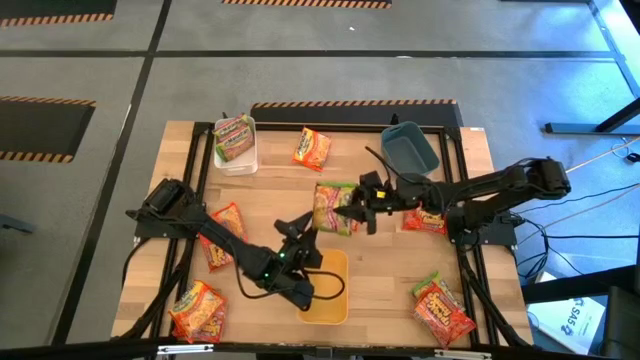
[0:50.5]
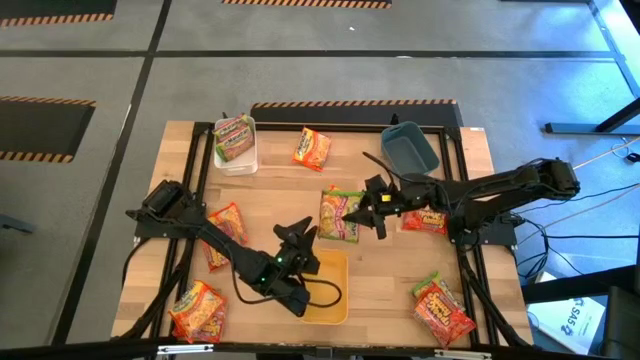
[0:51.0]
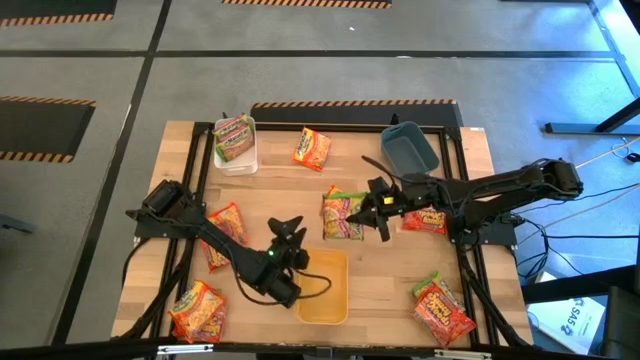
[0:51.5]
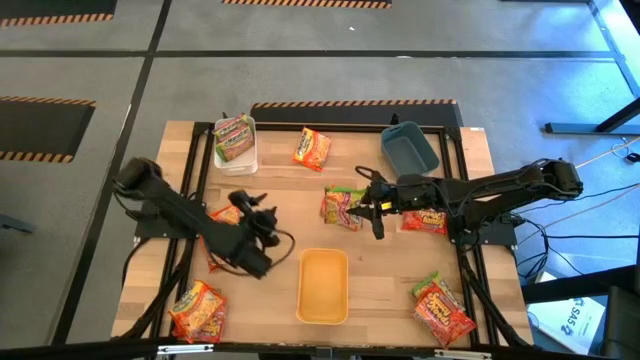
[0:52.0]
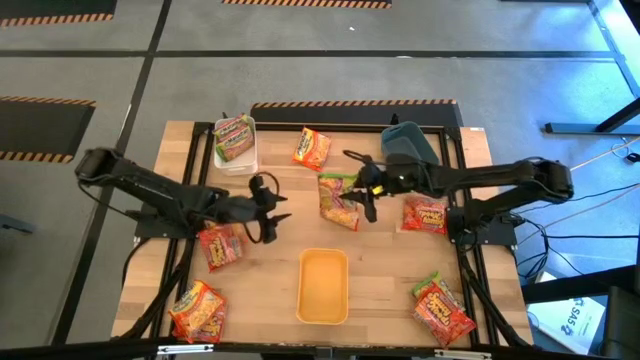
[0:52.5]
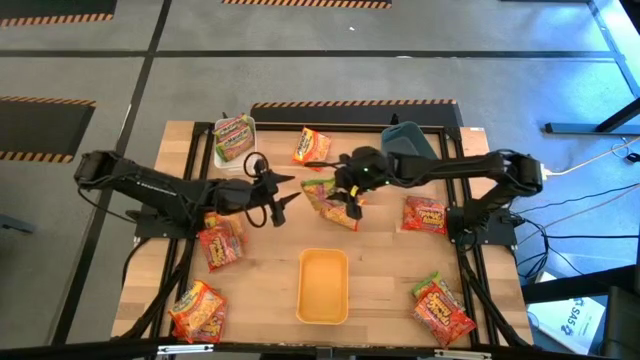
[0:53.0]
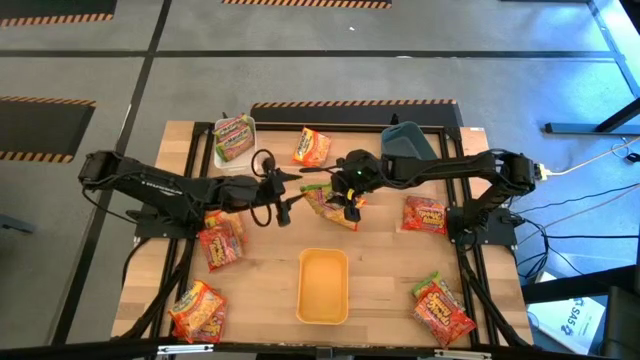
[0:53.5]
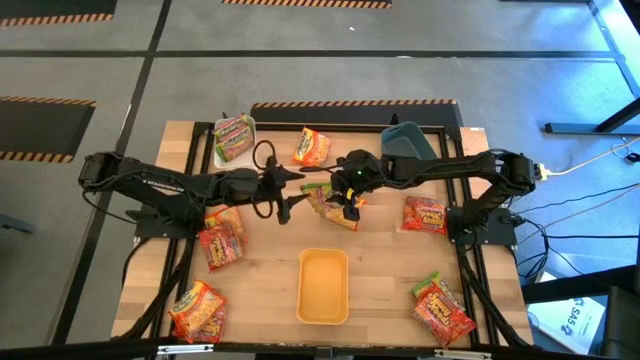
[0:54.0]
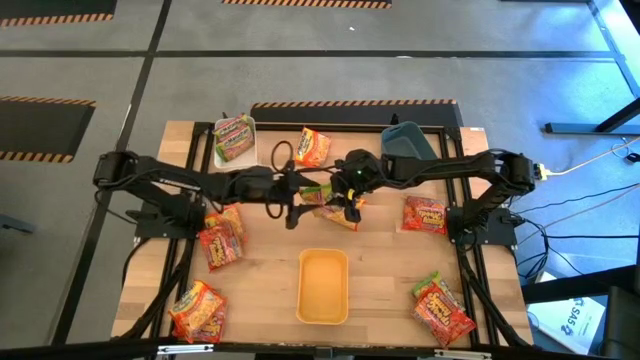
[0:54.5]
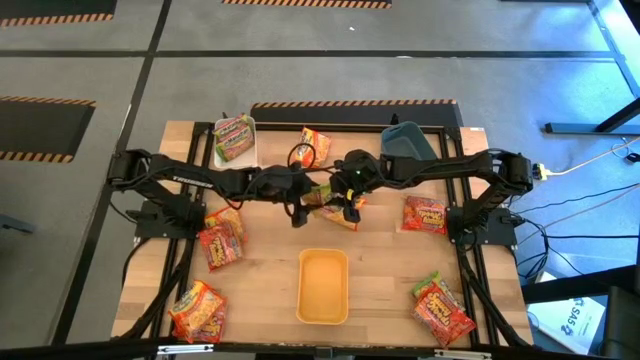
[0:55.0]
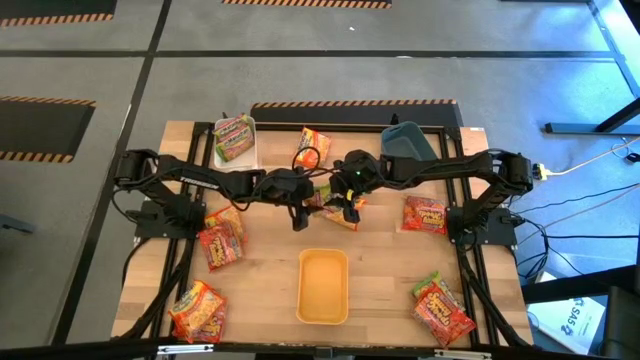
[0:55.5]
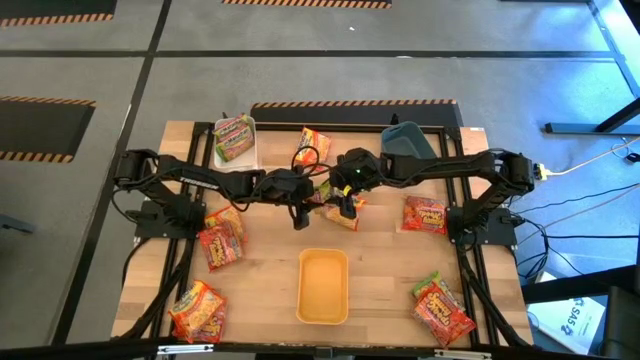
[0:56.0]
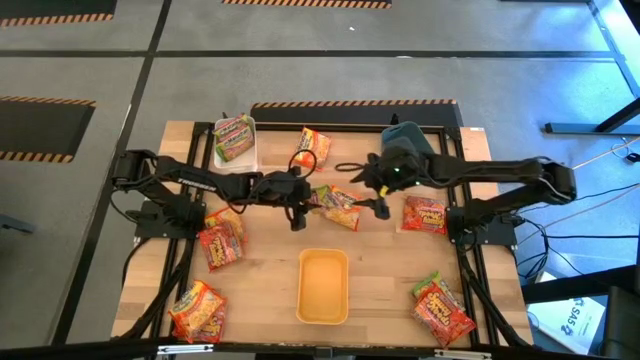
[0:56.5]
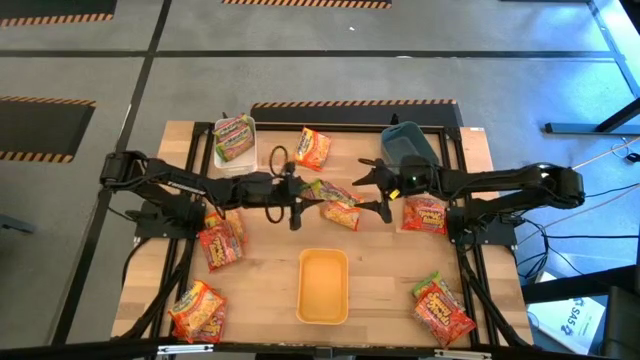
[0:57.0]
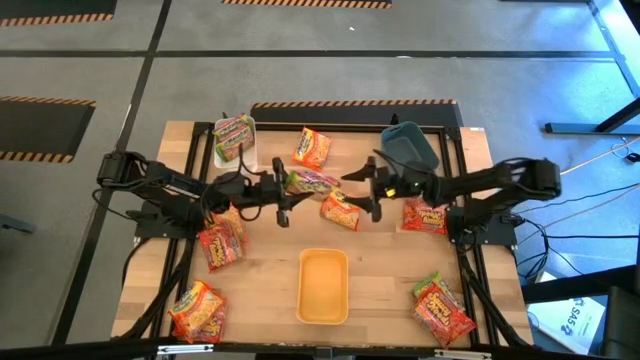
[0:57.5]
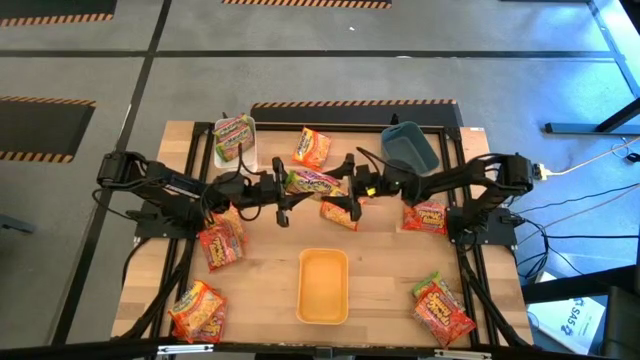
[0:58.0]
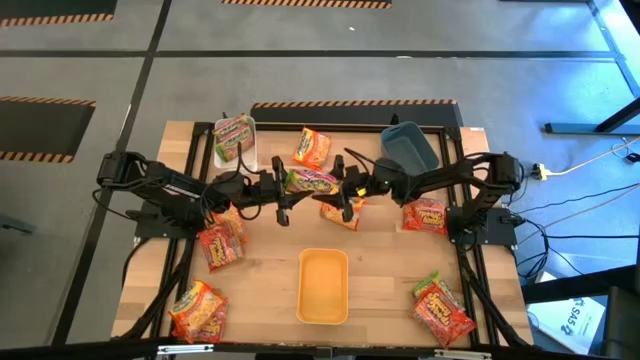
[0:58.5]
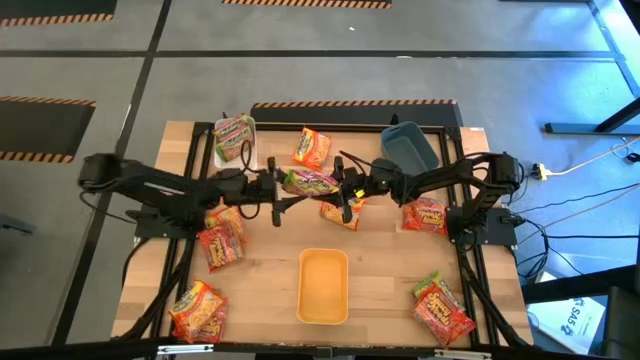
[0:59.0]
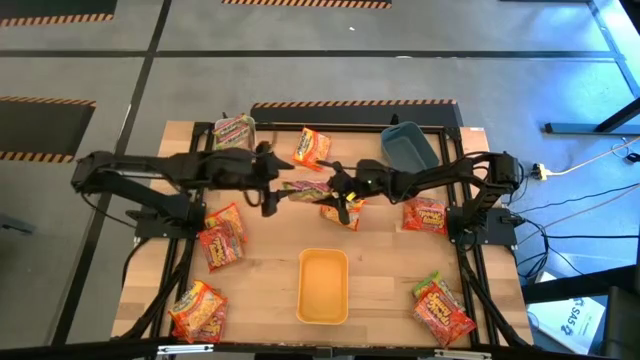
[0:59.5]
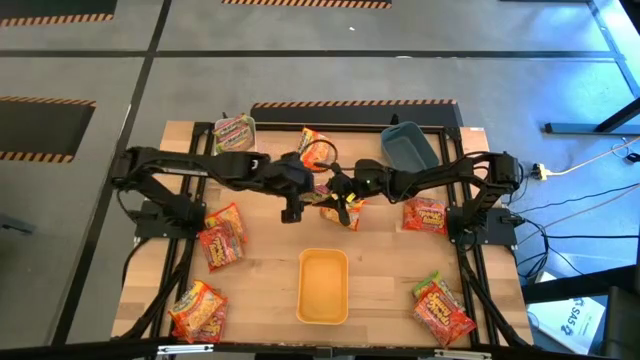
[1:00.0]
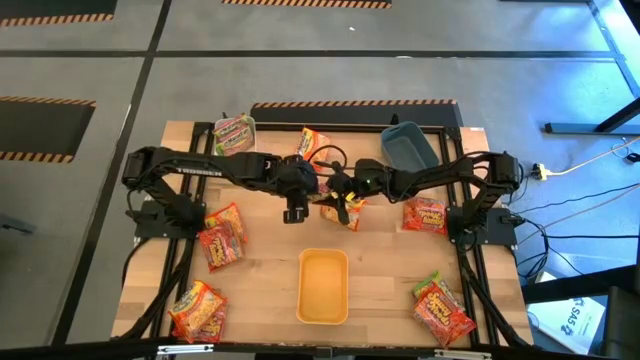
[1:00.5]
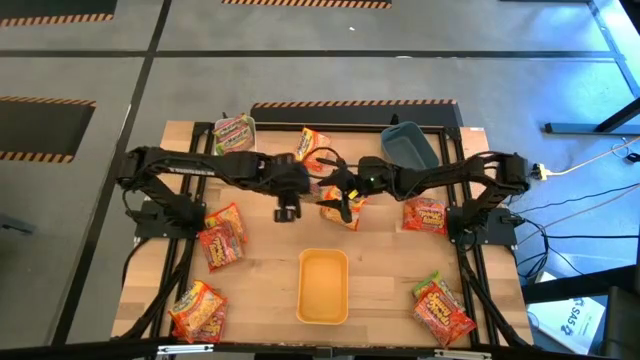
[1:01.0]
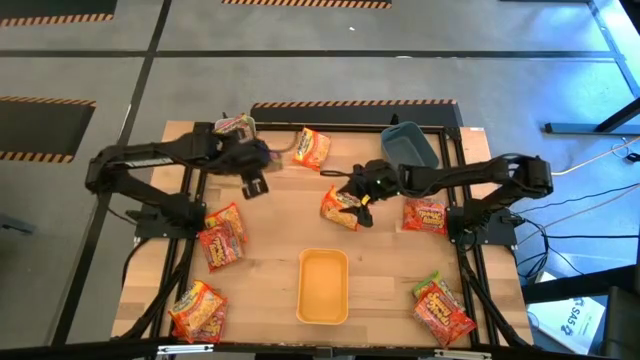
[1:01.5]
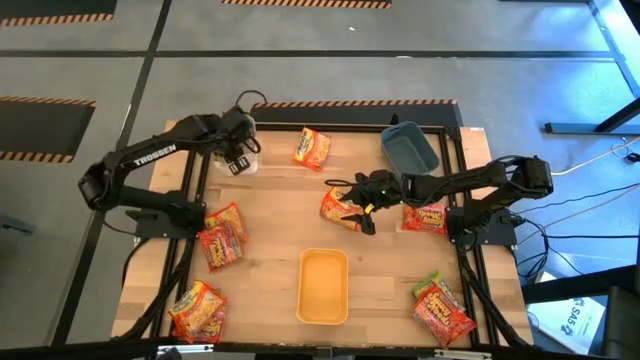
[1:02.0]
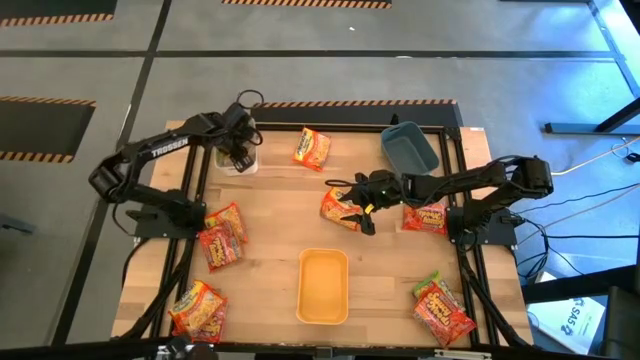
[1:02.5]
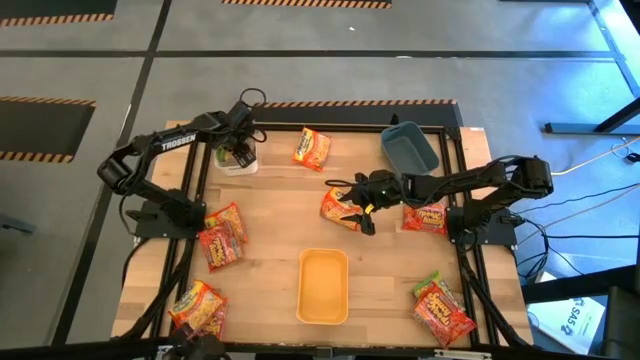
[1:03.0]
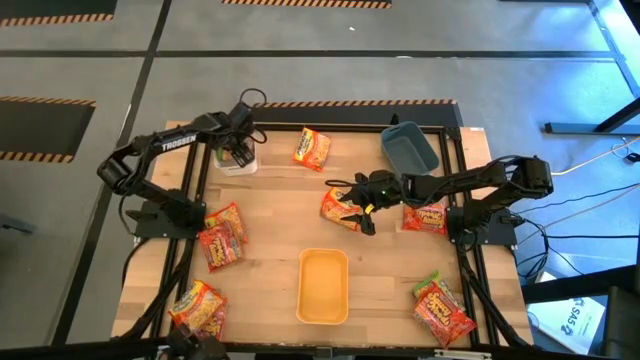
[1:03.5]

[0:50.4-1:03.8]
Task: Sort Maruchan noodles
Put the top green noodle pack into the white bin

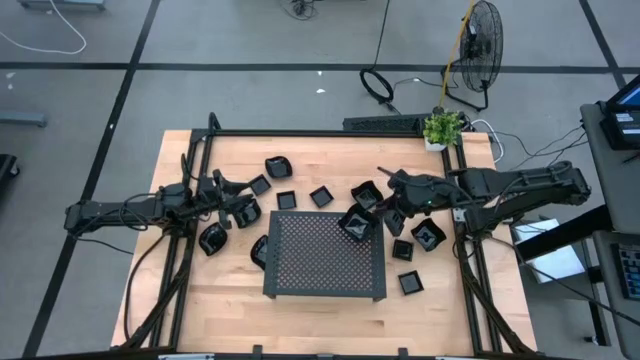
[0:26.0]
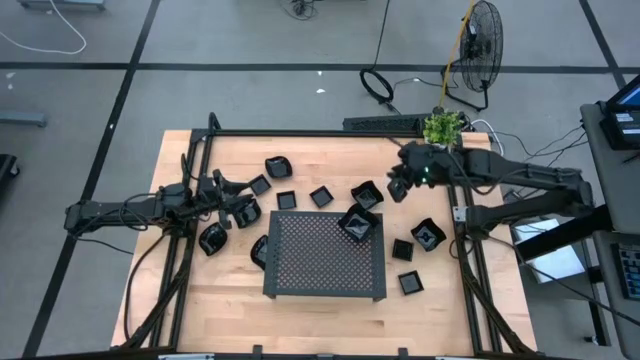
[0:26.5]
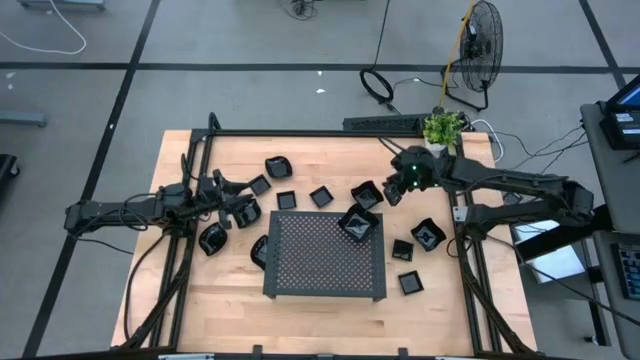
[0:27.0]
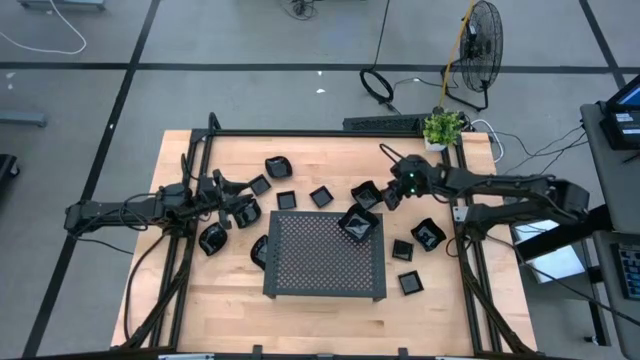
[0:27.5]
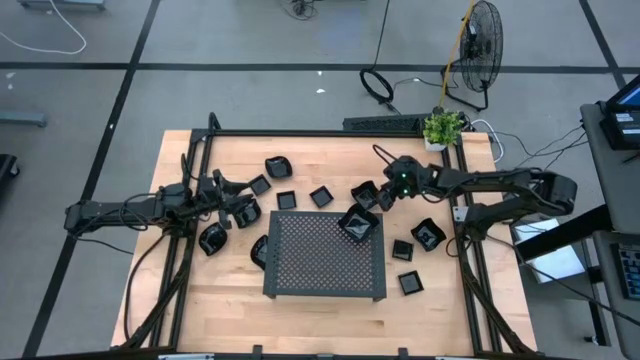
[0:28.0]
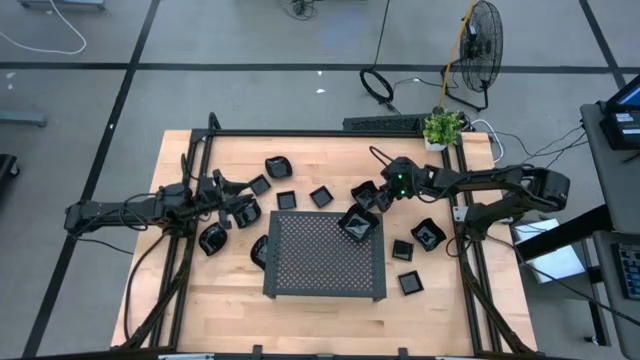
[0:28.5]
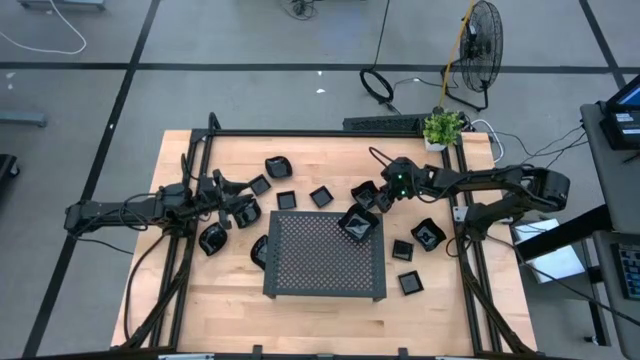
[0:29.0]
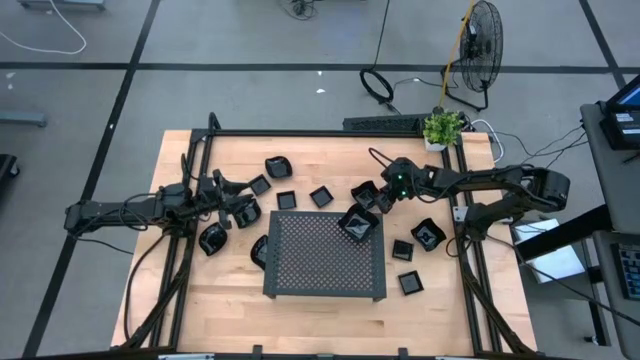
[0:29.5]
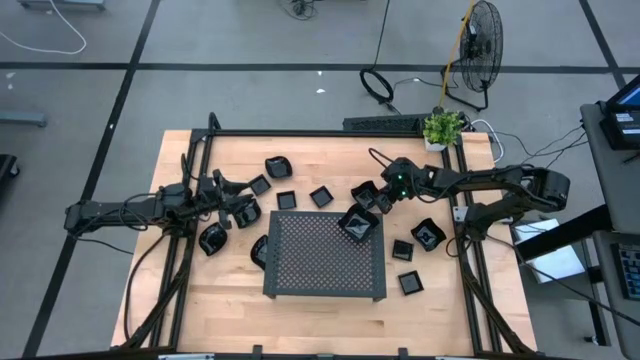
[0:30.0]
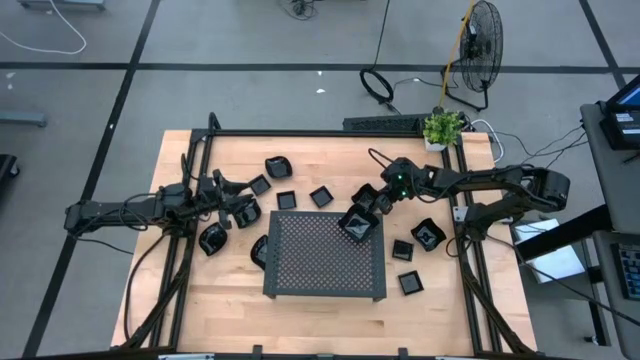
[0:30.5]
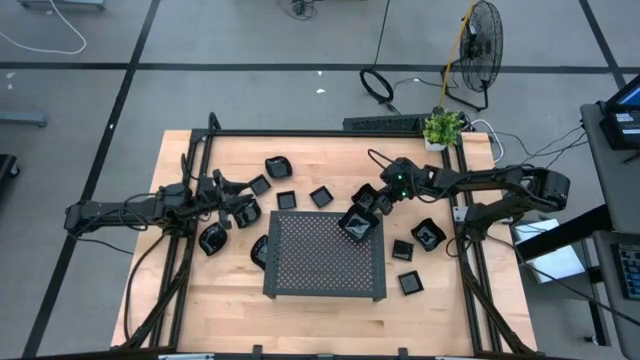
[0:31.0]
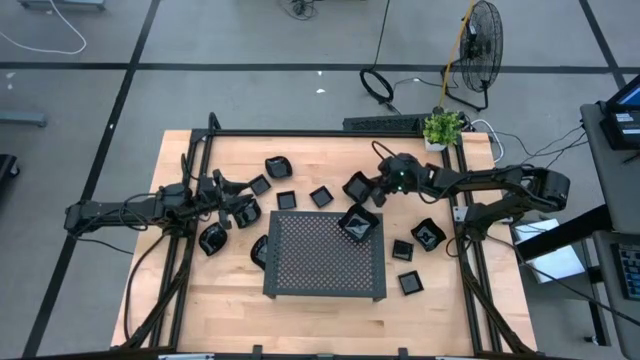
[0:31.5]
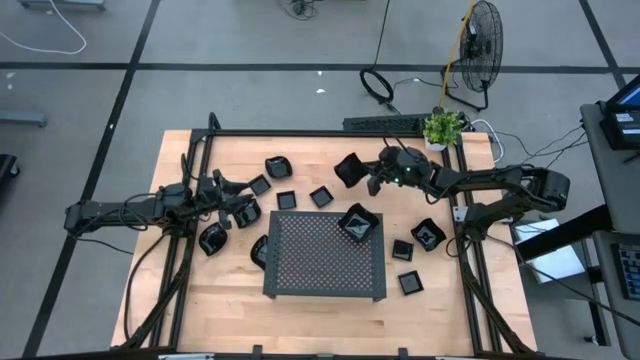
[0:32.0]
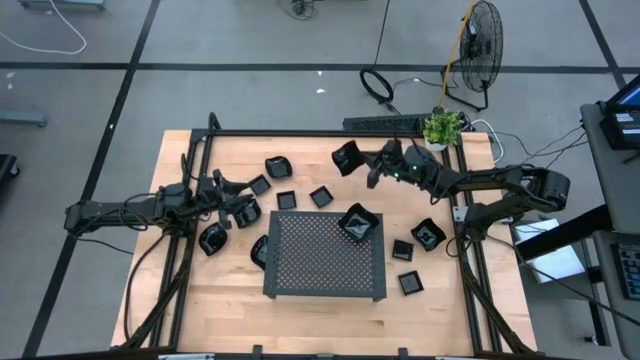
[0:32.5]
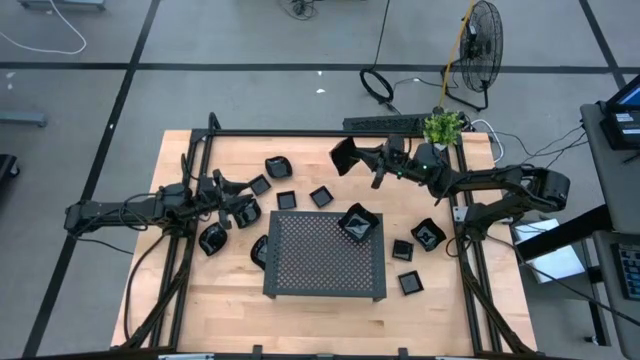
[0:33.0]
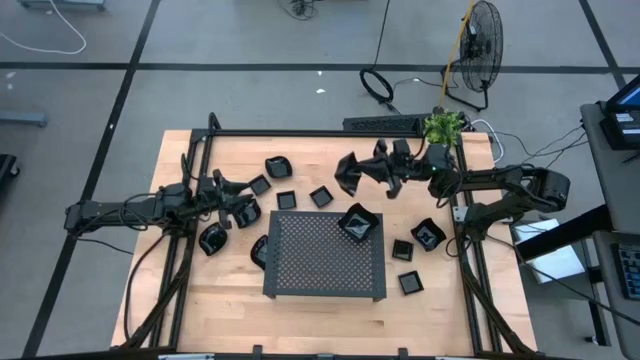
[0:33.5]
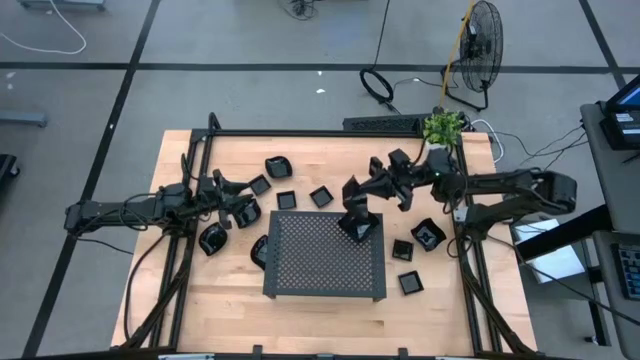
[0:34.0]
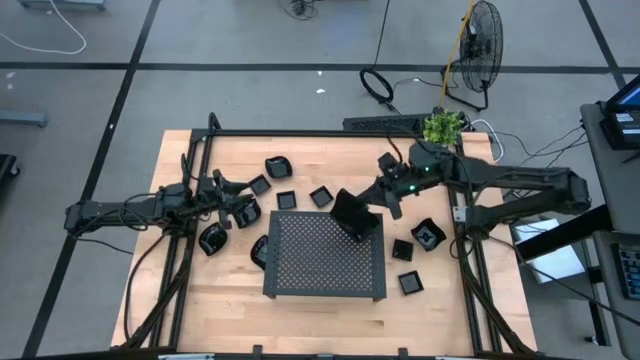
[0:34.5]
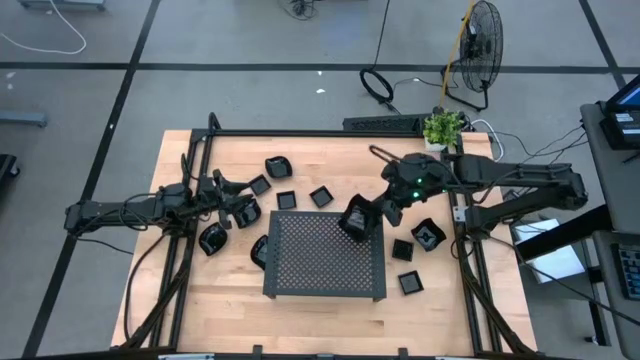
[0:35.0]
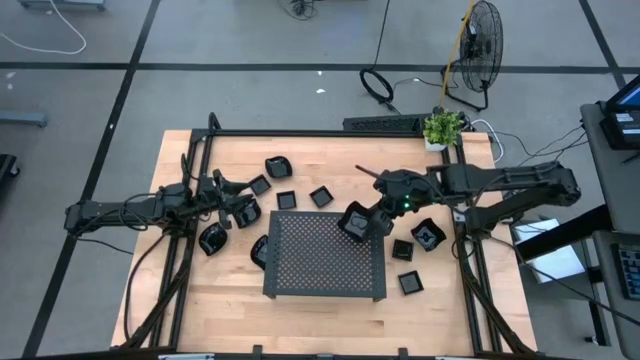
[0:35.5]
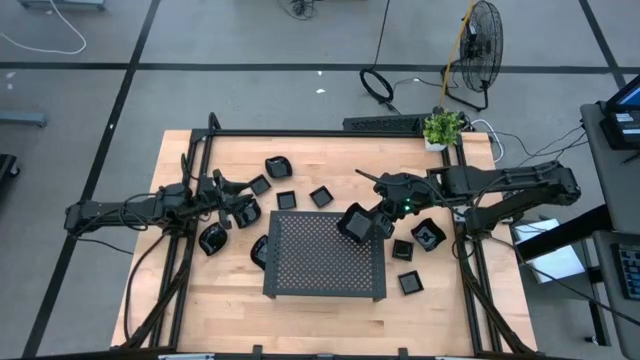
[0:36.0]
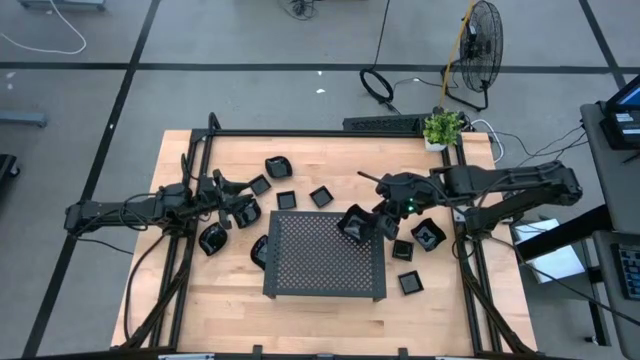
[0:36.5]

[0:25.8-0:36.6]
Task: Pick & Place Mini shaped plates
Stack the black distorted square plate on top of the black distorted square plates on the shelf
